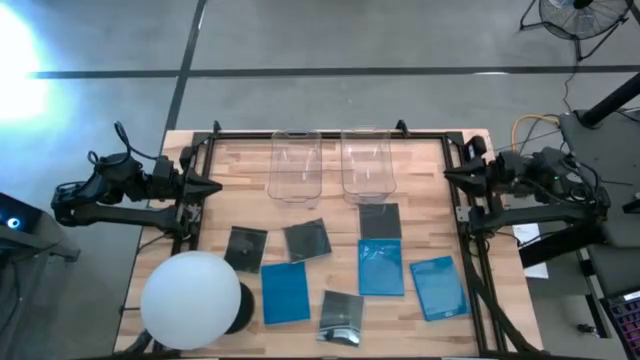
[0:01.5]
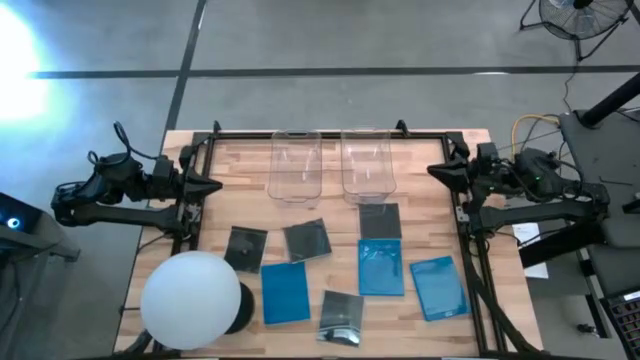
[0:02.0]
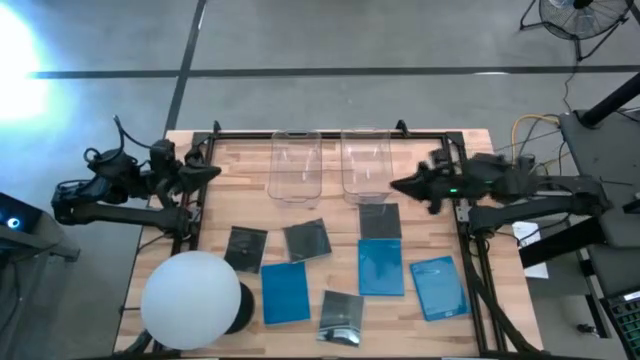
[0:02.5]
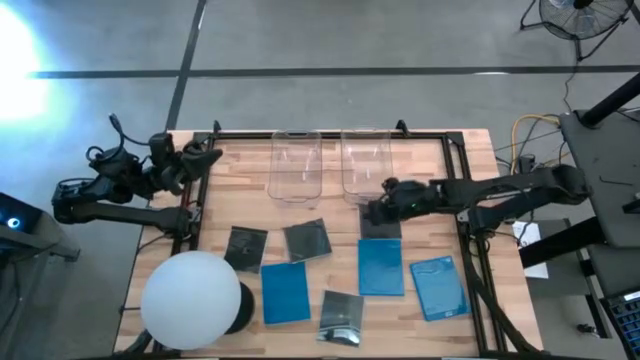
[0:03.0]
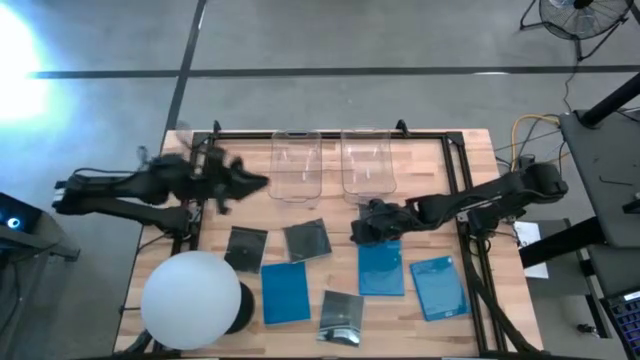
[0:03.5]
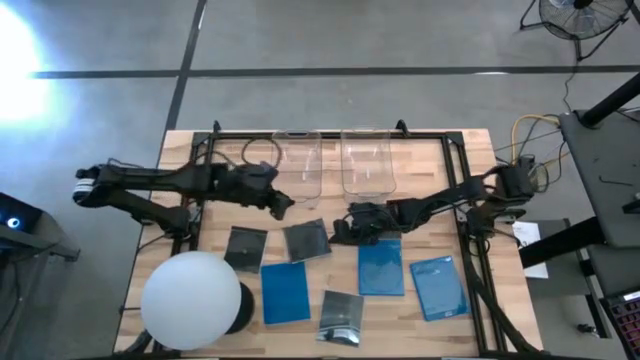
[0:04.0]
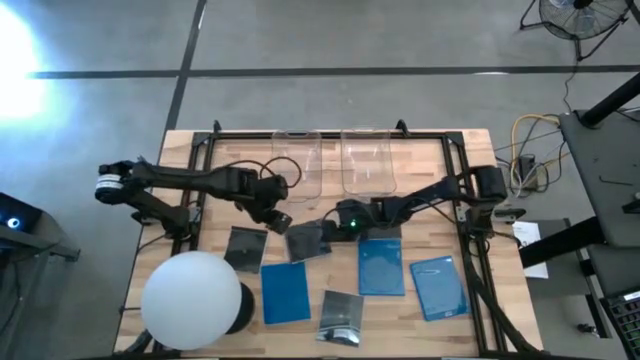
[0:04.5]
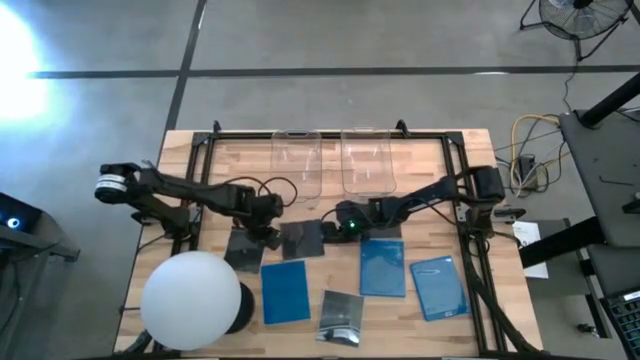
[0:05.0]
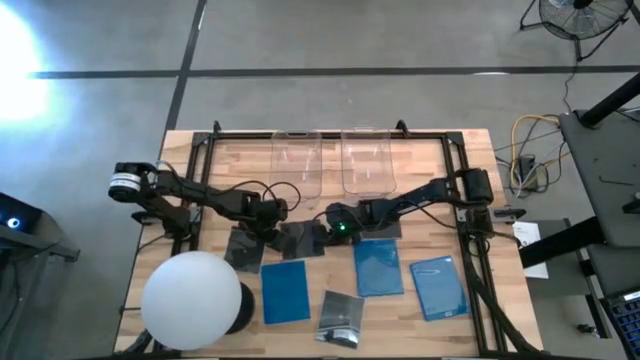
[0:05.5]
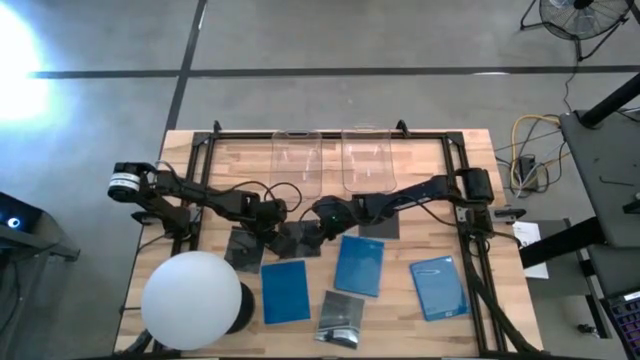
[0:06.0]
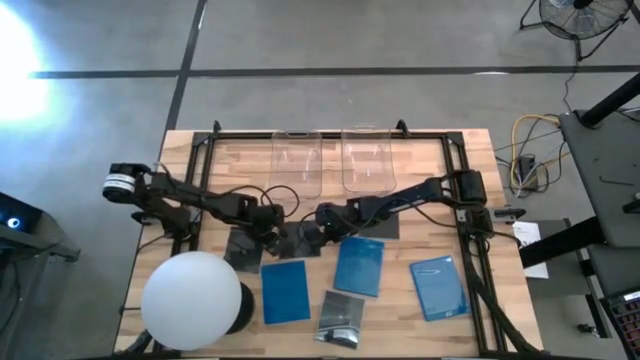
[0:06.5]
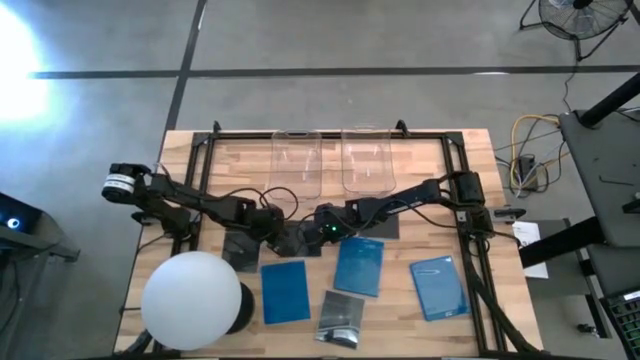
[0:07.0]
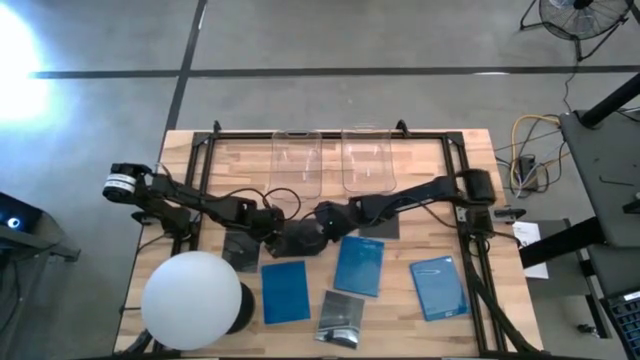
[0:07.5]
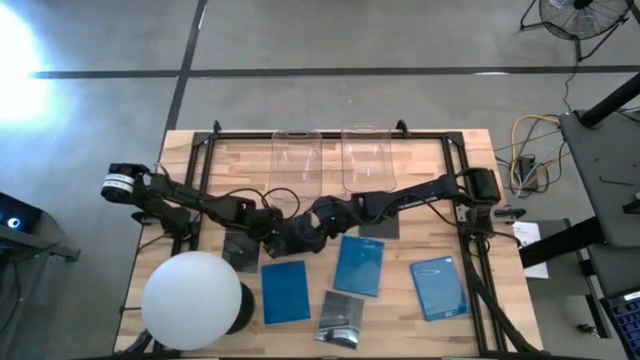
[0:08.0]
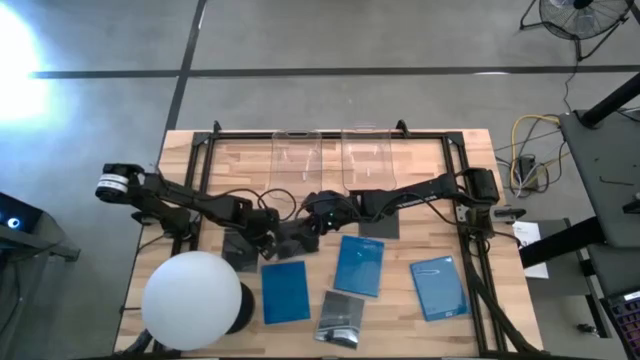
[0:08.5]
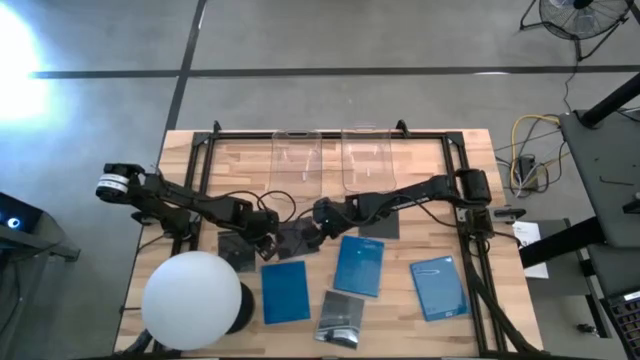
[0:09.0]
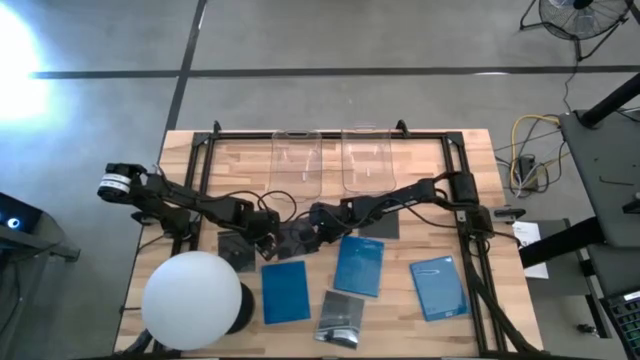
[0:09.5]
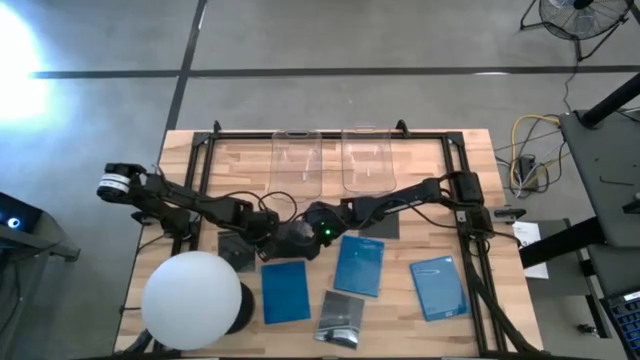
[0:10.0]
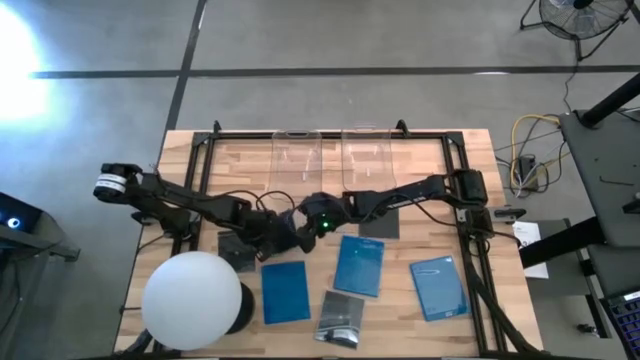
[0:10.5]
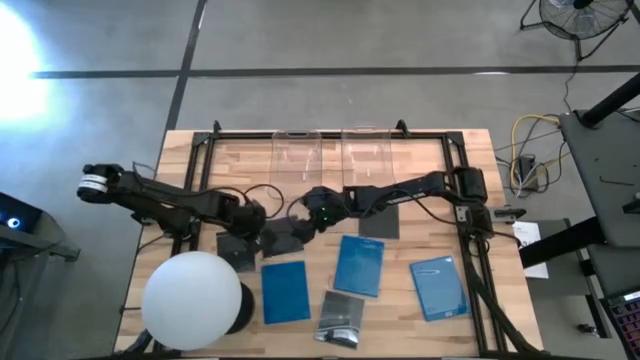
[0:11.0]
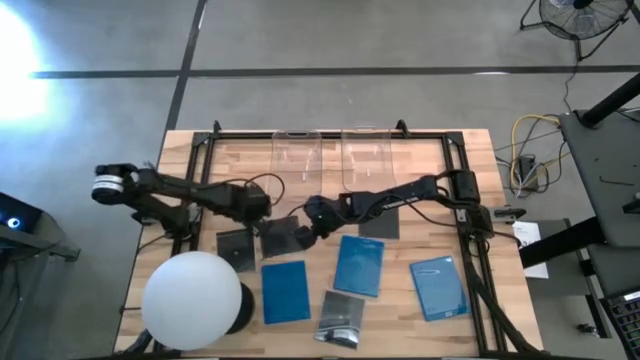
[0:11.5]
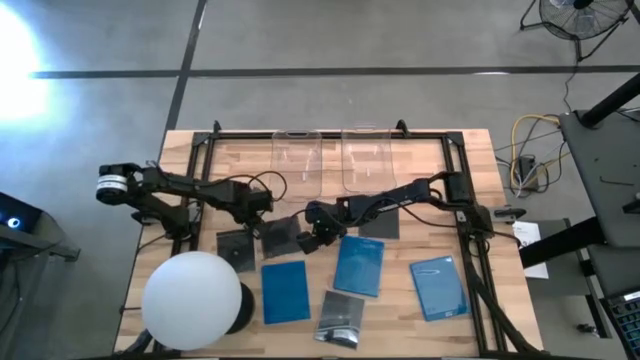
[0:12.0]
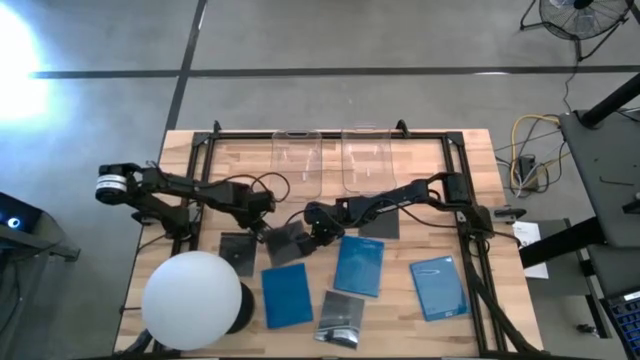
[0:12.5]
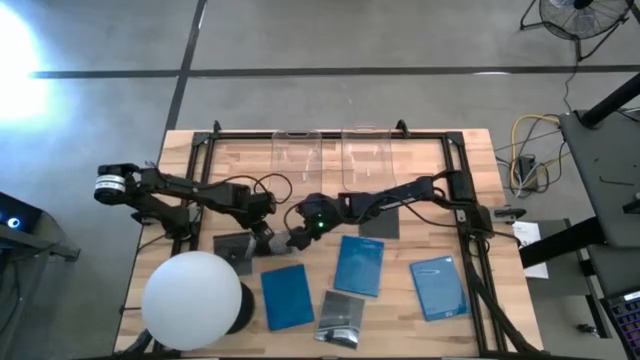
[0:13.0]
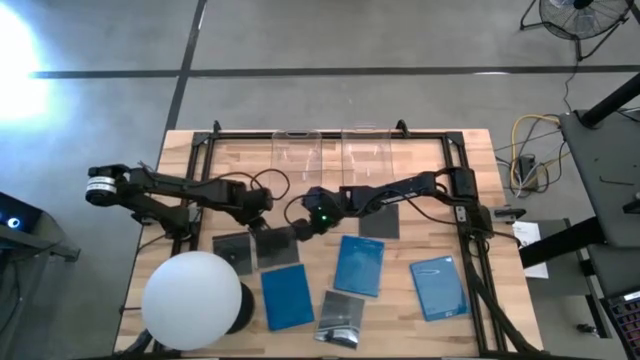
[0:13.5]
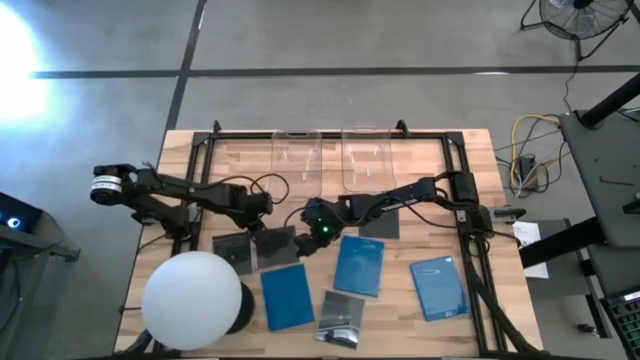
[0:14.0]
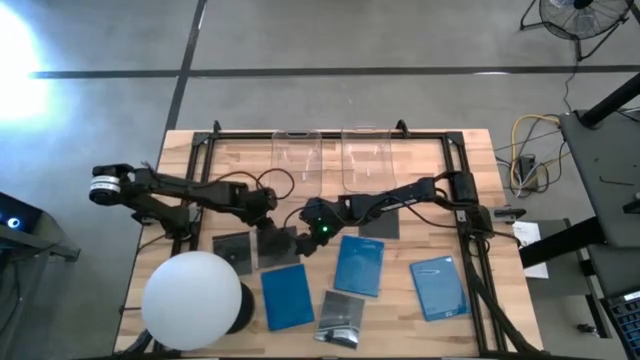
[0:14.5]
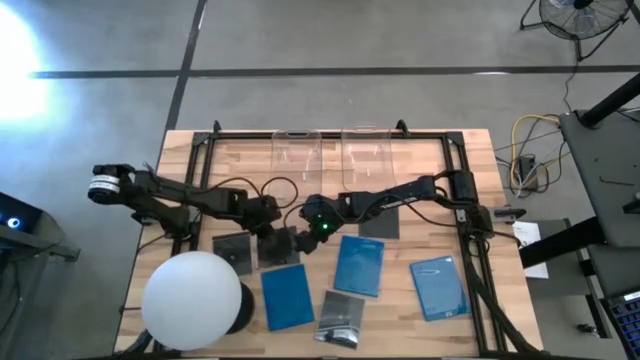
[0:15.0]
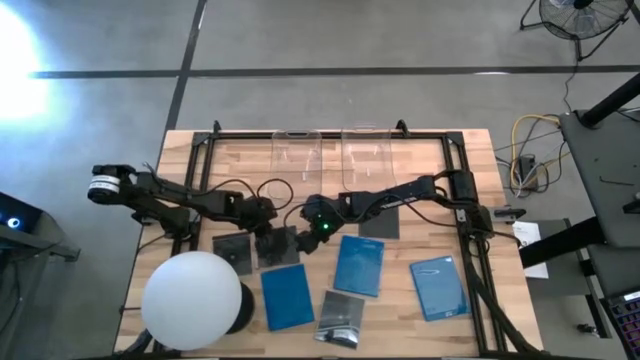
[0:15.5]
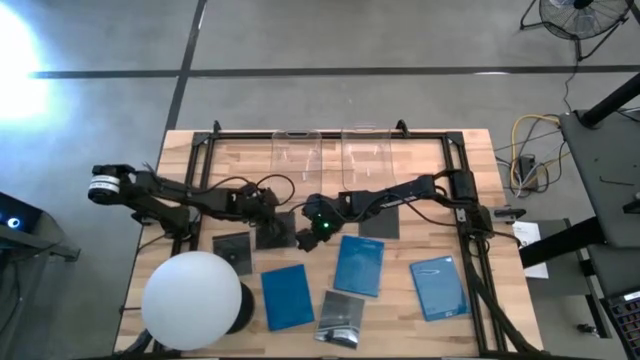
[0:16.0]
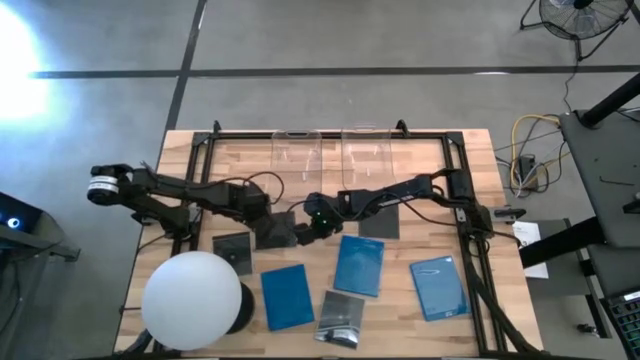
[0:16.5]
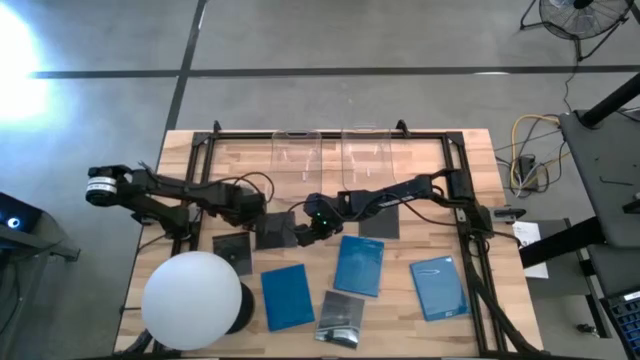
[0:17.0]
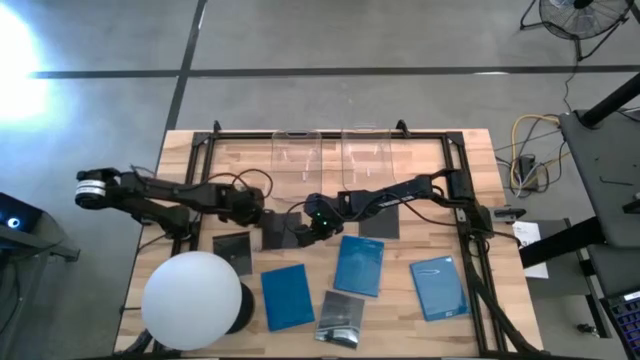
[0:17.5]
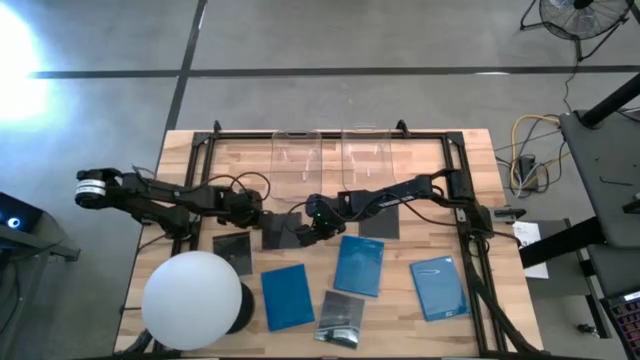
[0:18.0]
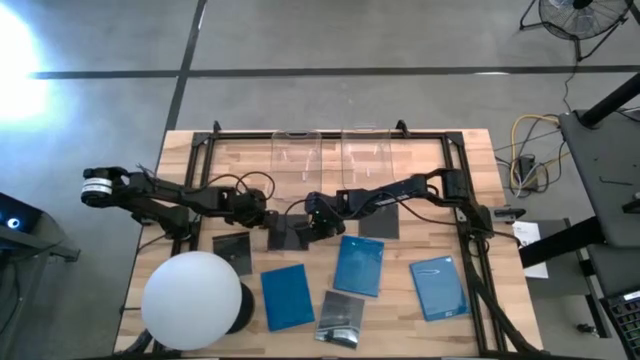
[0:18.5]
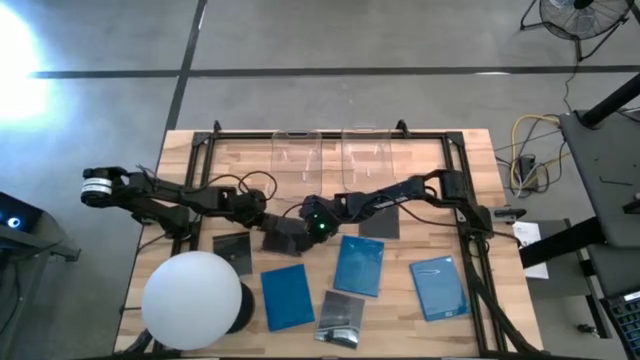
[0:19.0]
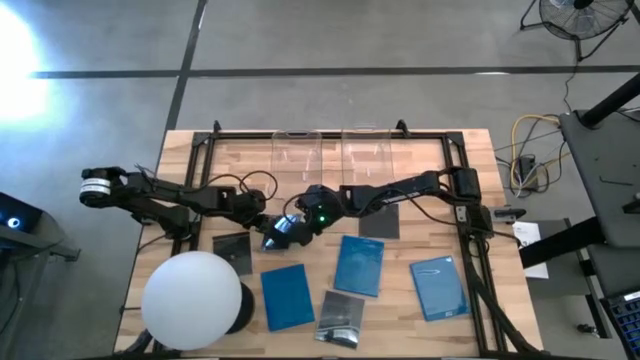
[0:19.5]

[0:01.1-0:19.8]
Task: Pick & place jewel cases by type
Put the black cd case into the left transparent bin
